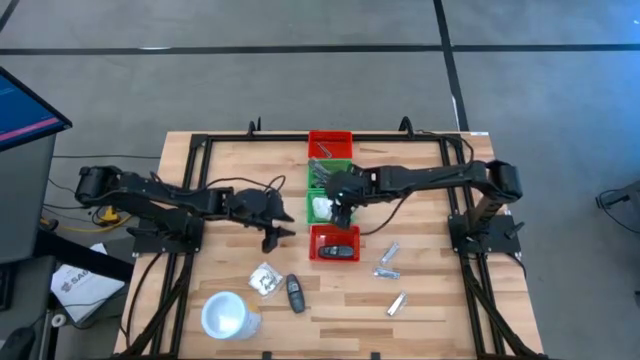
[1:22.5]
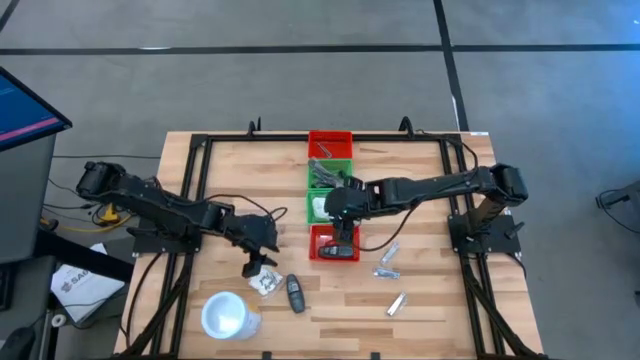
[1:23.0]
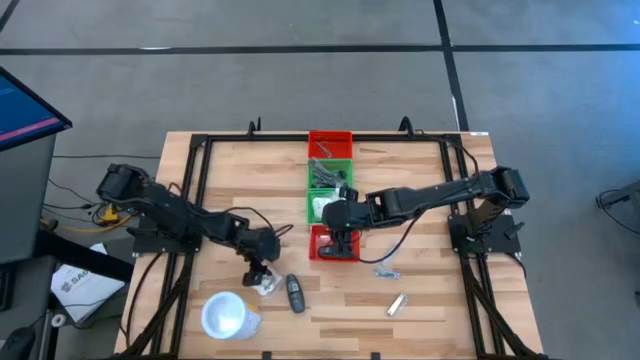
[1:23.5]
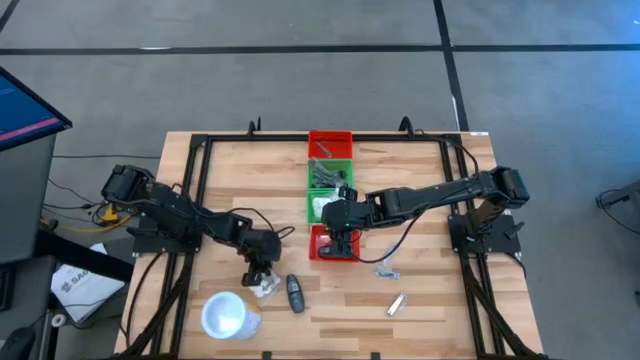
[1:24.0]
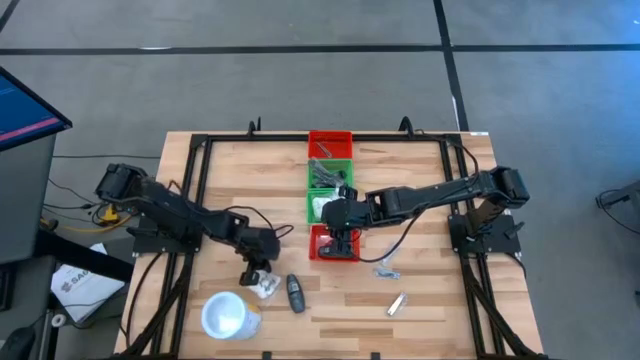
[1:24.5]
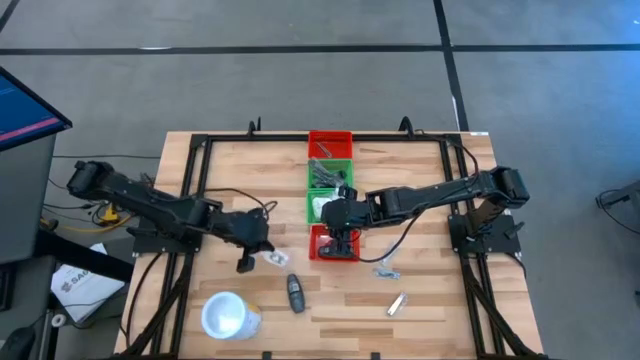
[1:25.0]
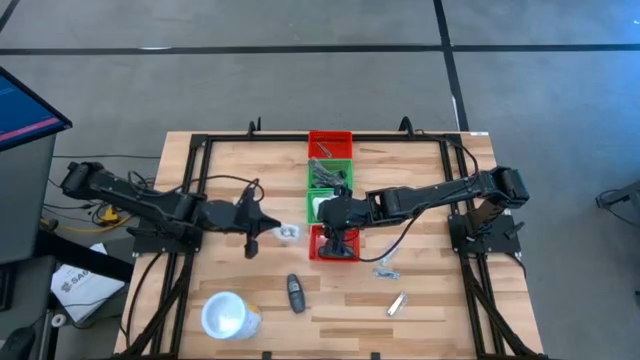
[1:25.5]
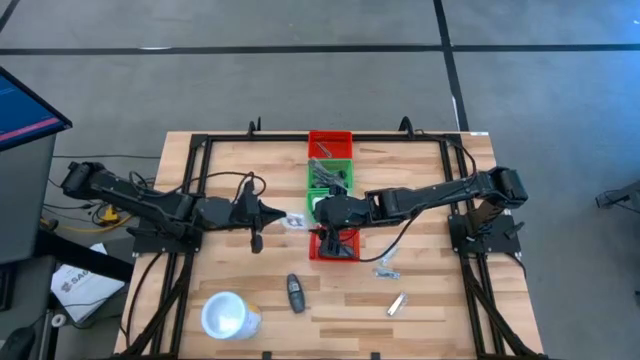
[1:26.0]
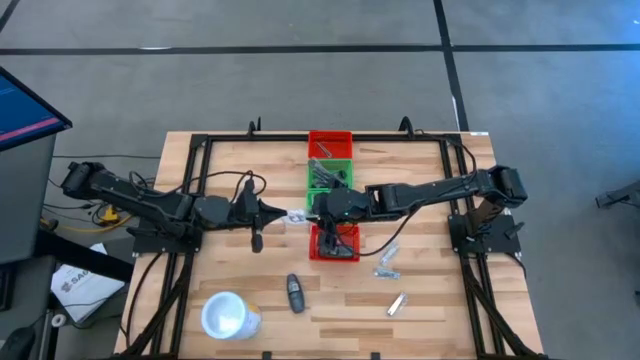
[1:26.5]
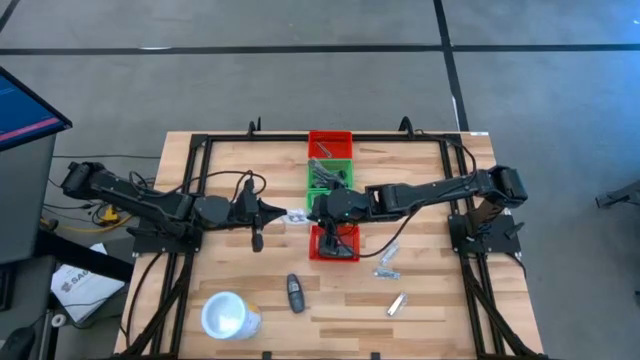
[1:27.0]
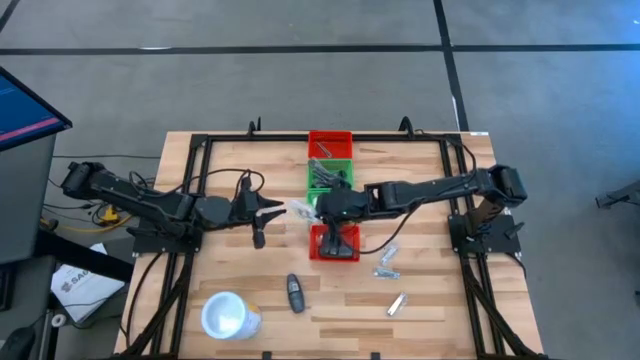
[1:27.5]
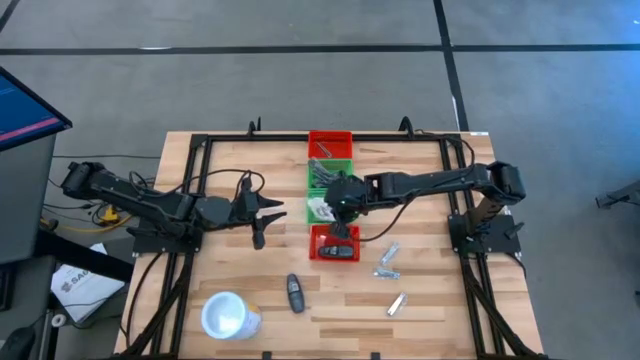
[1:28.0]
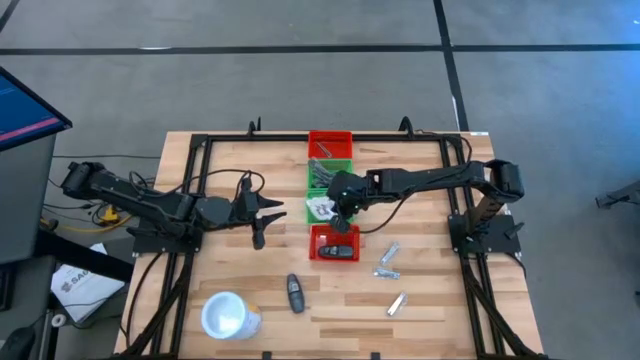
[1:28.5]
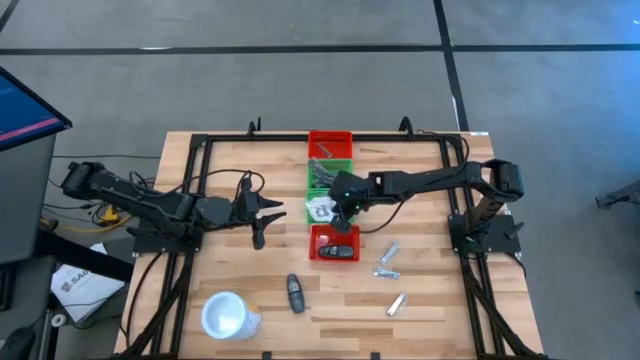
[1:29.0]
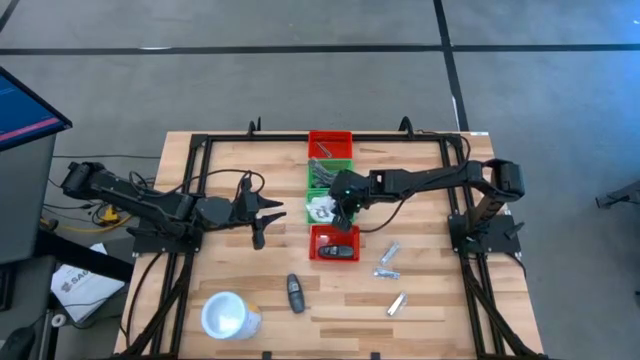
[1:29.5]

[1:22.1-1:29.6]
Task: Pick & Place Travel size toiletries
Put the white cotton pack into the top green bin

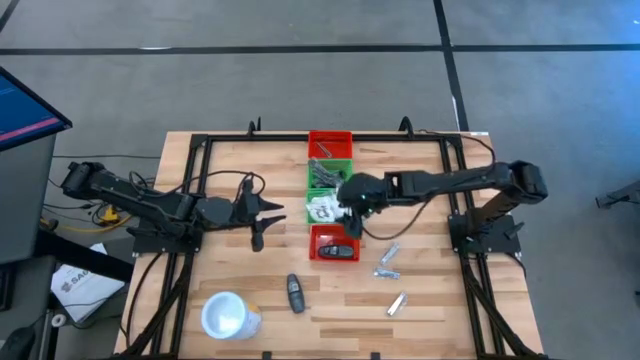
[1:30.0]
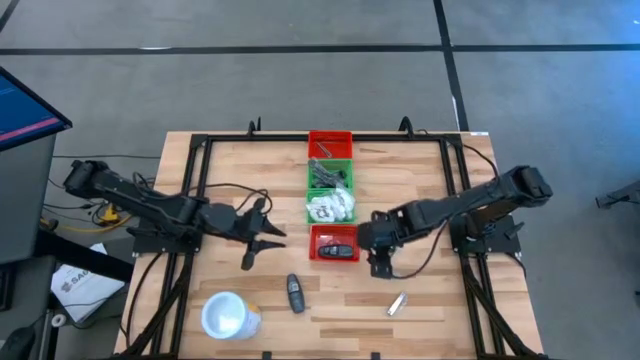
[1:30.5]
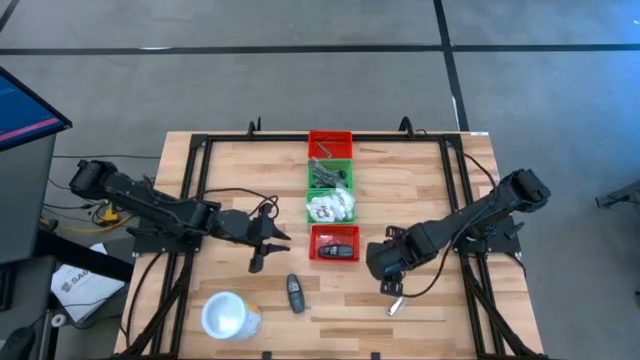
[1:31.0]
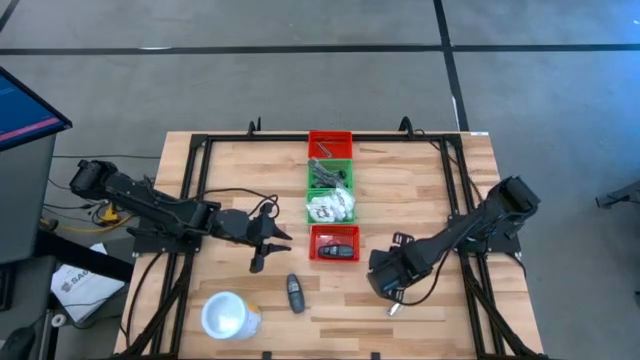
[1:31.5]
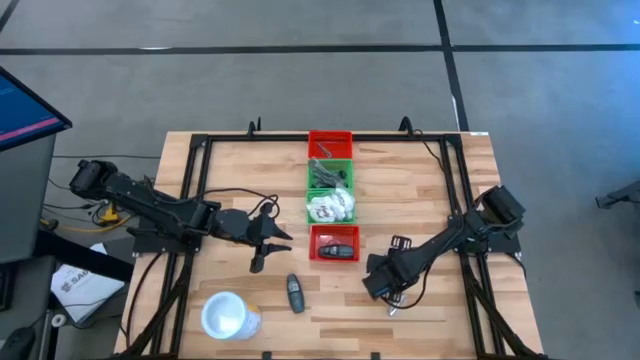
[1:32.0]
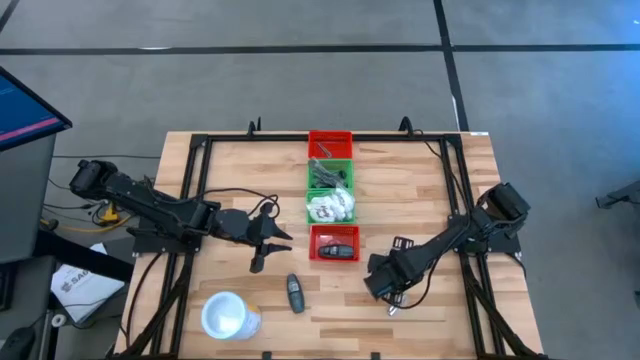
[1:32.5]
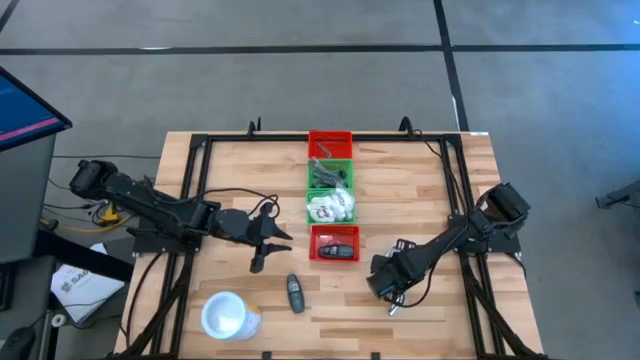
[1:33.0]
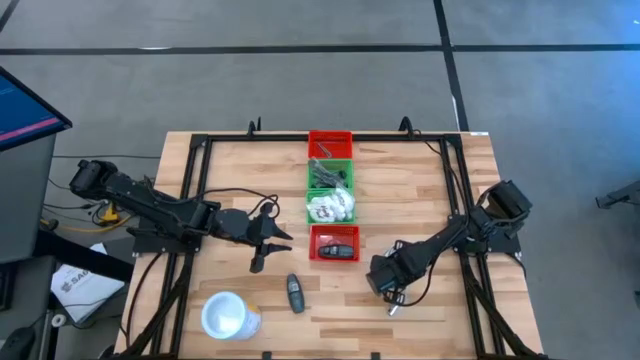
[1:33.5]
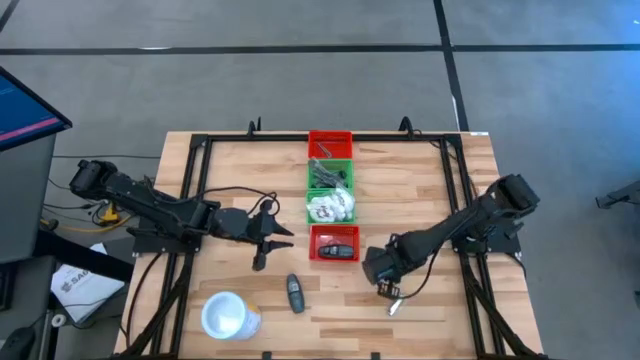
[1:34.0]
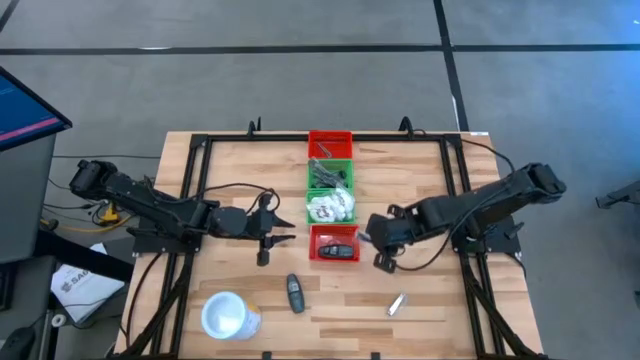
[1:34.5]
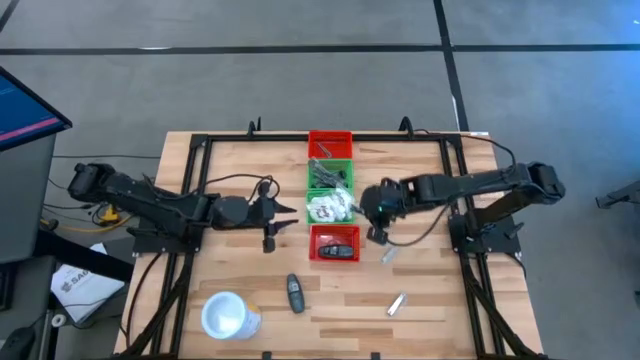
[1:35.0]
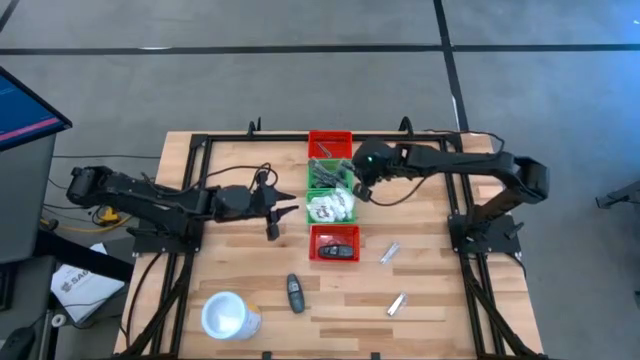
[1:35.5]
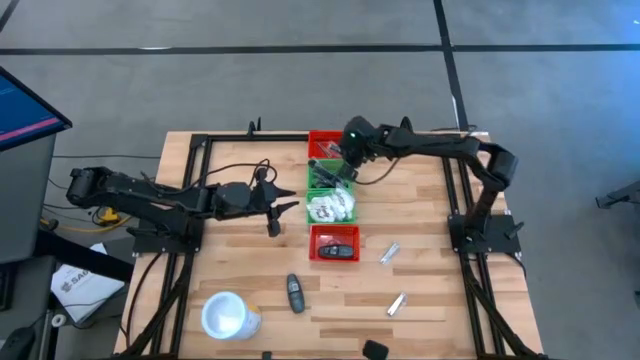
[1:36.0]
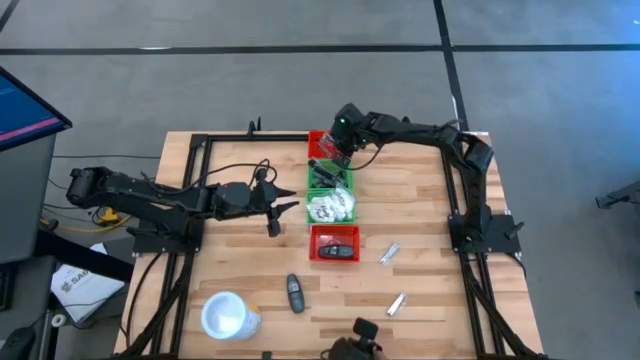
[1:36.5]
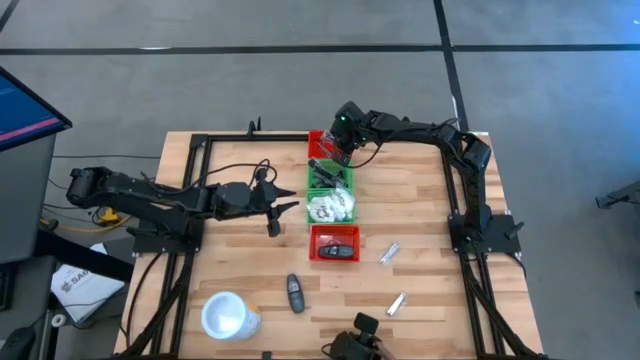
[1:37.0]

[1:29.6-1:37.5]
Put the silver nail cutter into the top red bin

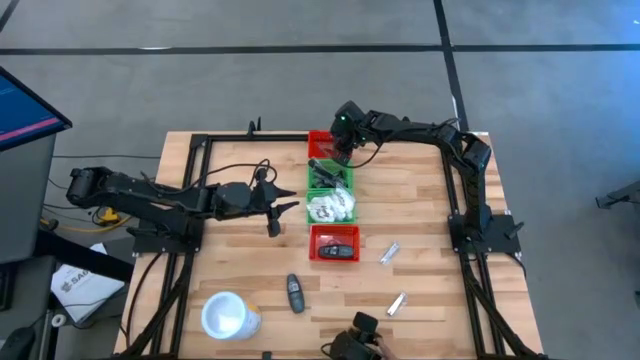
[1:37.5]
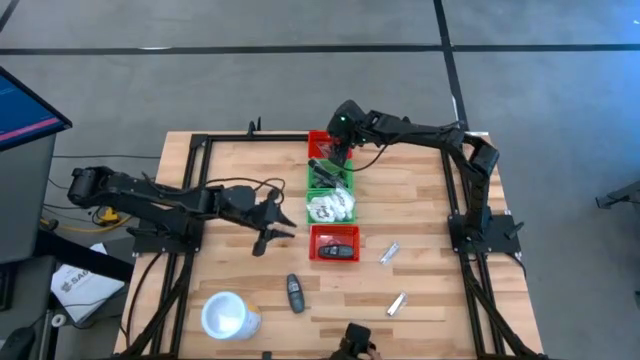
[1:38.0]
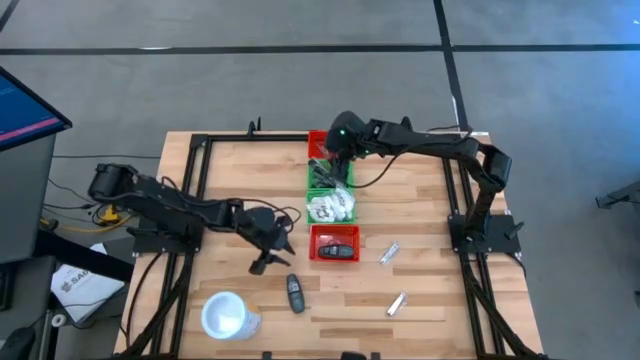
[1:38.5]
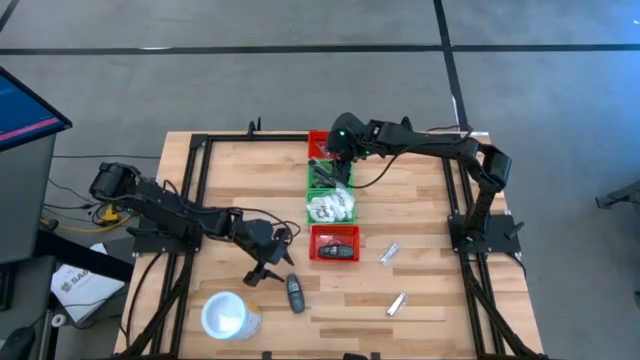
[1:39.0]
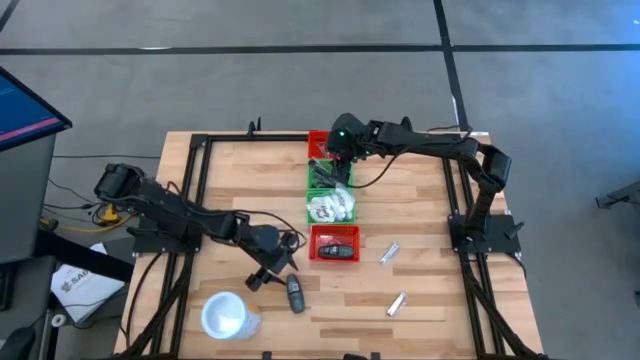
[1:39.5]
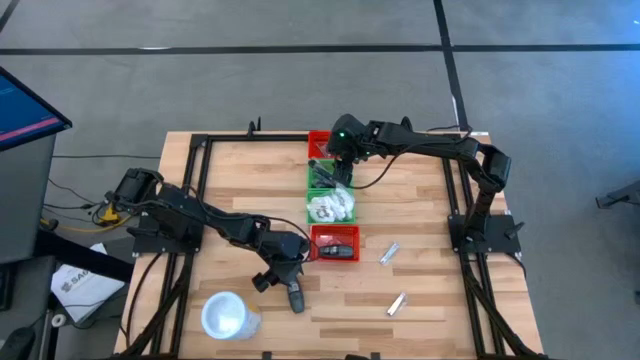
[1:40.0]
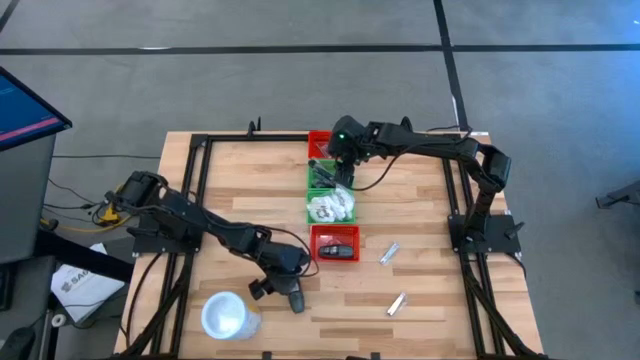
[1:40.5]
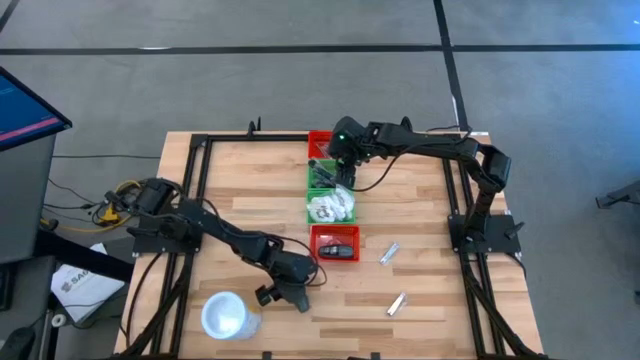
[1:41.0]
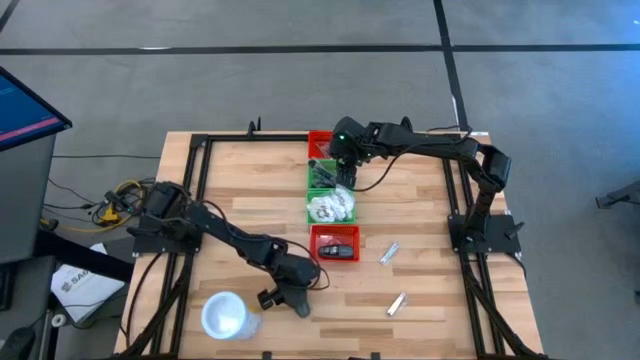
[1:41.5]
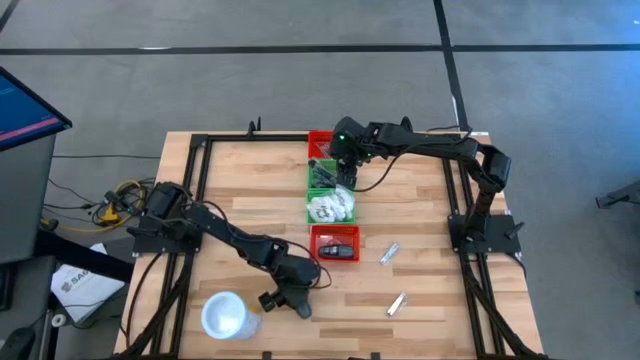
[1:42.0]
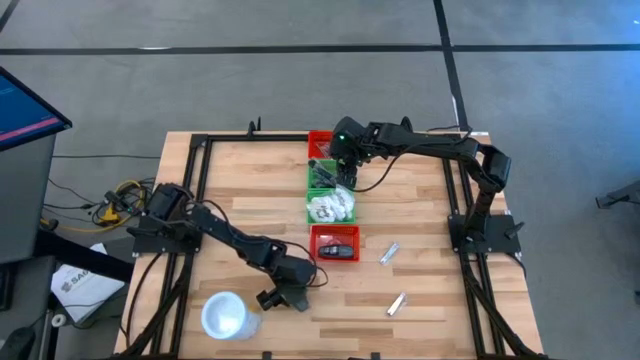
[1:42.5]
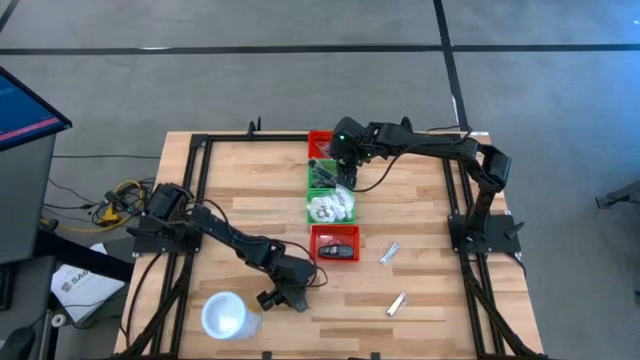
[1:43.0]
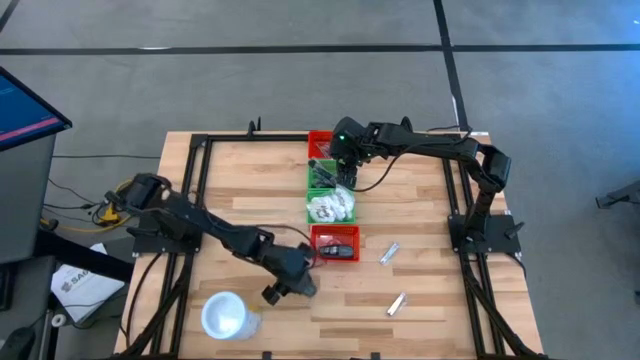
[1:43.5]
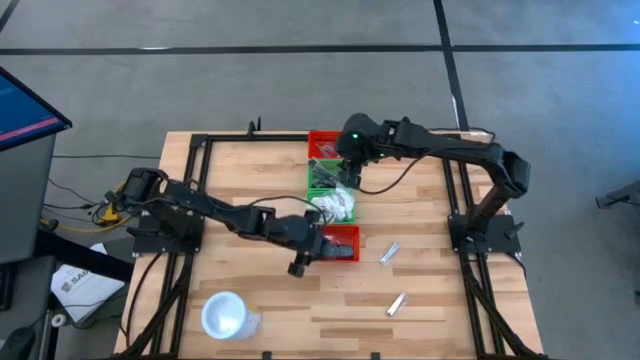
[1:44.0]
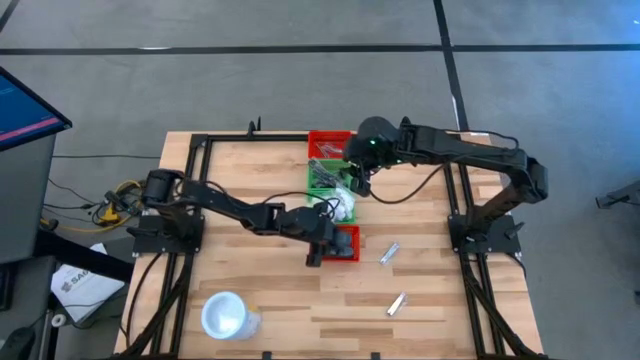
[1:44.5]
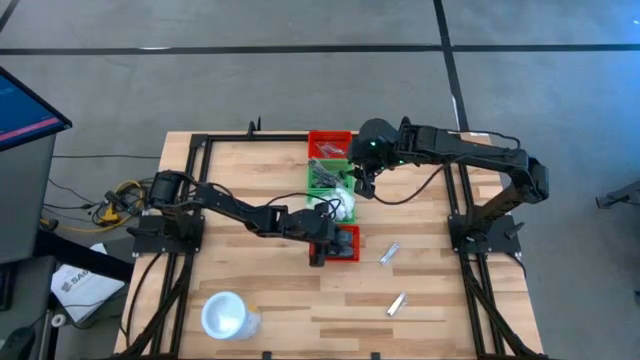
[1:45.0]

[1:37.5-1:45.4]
Put the gray deodorant into the bottom red bin
